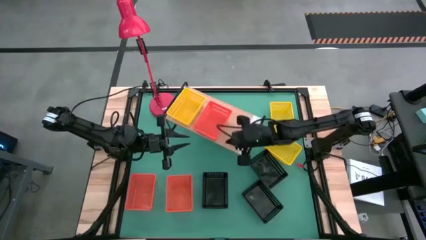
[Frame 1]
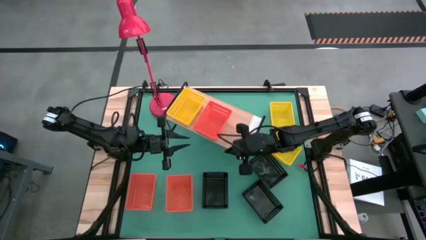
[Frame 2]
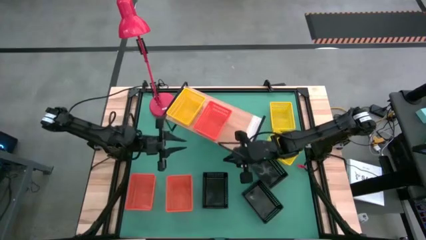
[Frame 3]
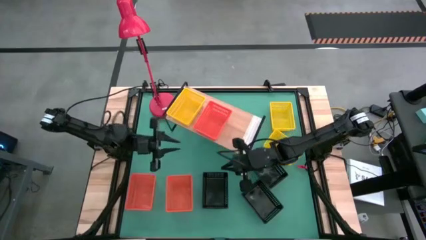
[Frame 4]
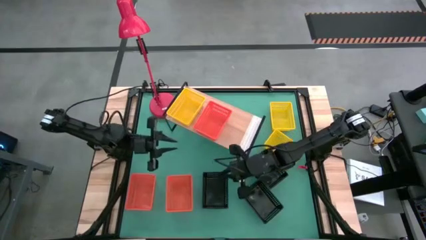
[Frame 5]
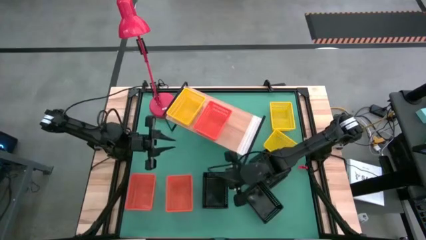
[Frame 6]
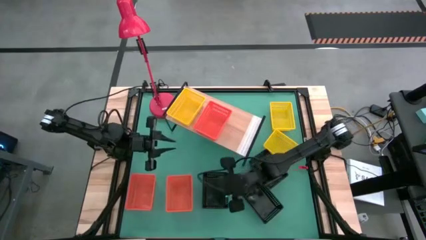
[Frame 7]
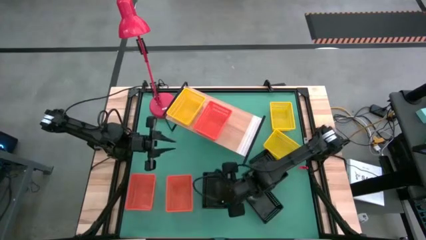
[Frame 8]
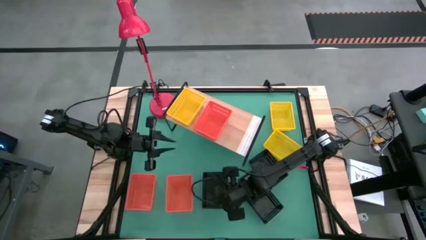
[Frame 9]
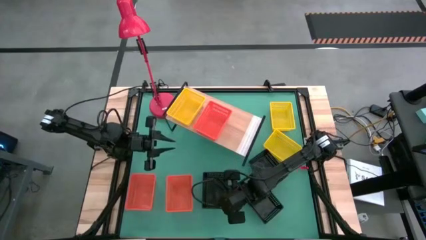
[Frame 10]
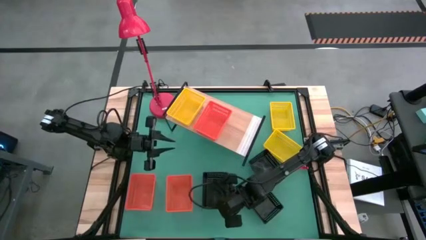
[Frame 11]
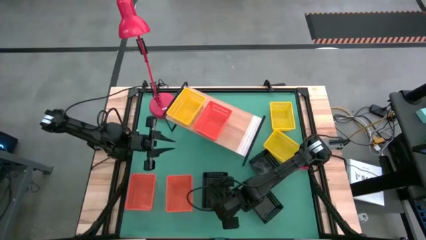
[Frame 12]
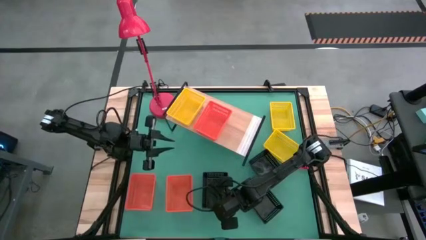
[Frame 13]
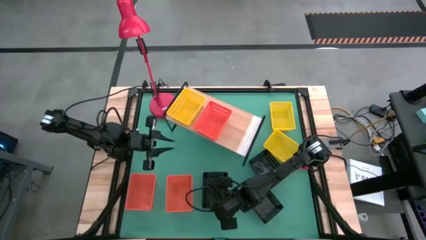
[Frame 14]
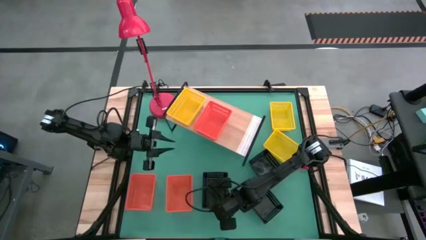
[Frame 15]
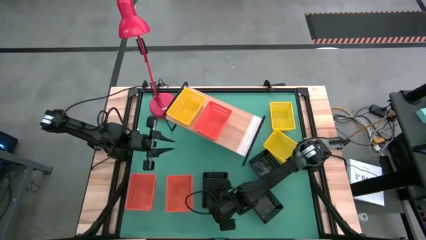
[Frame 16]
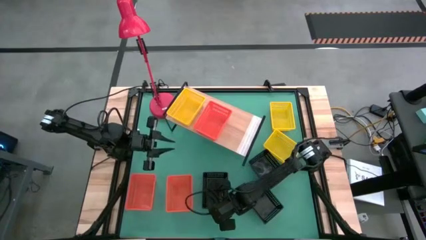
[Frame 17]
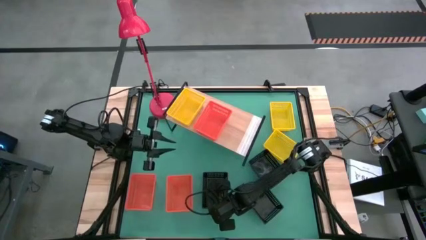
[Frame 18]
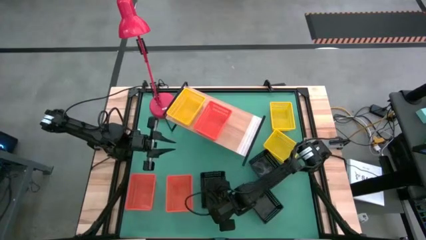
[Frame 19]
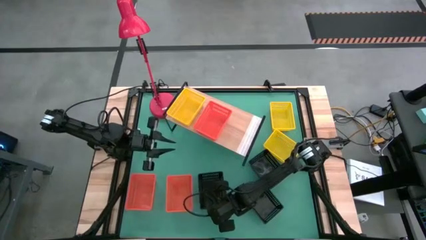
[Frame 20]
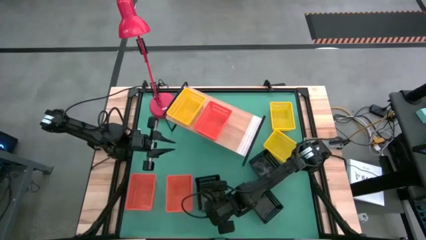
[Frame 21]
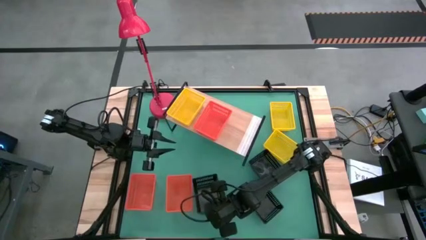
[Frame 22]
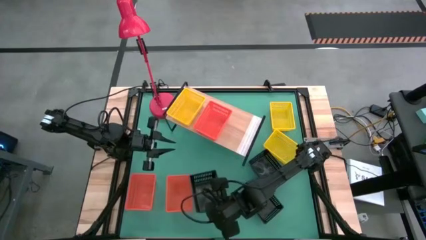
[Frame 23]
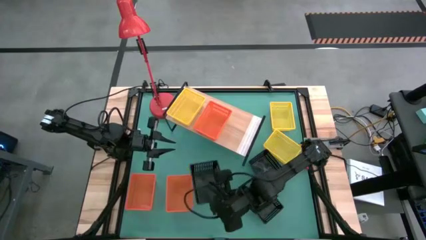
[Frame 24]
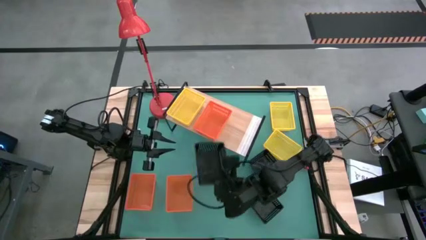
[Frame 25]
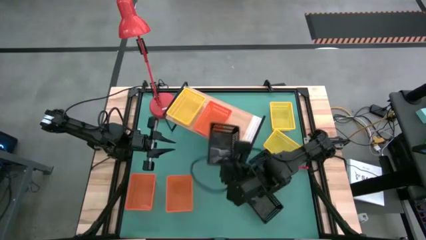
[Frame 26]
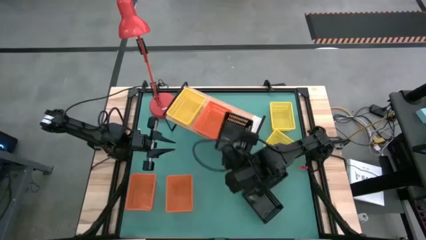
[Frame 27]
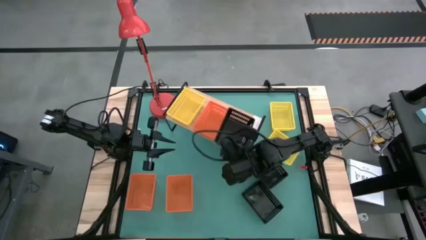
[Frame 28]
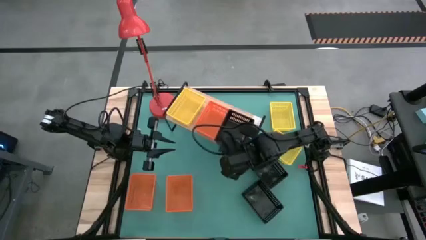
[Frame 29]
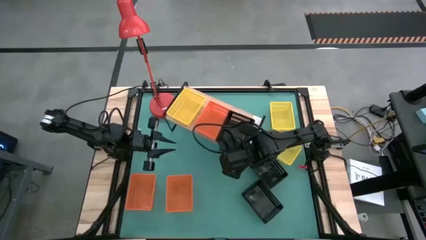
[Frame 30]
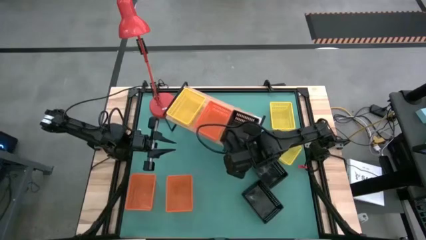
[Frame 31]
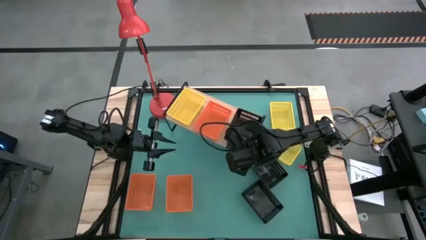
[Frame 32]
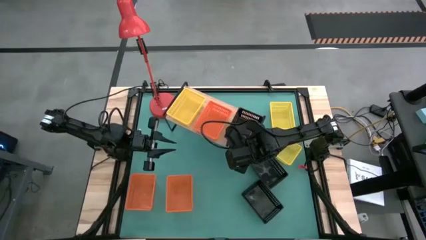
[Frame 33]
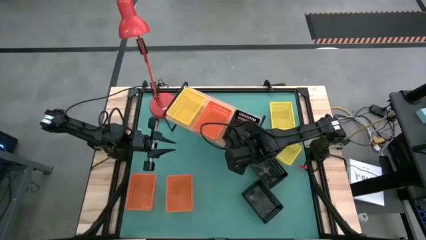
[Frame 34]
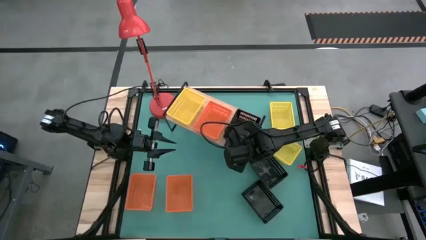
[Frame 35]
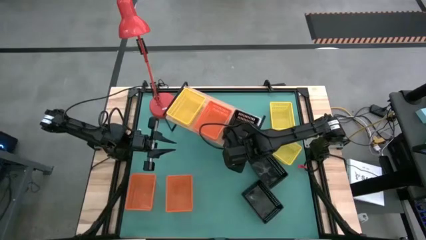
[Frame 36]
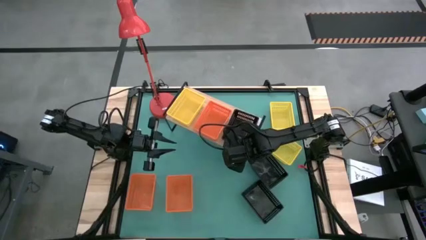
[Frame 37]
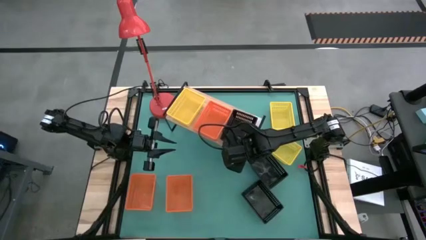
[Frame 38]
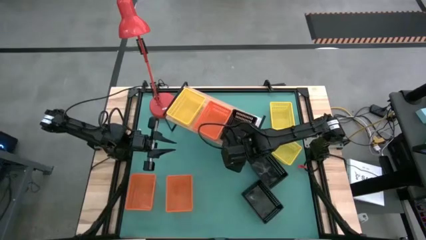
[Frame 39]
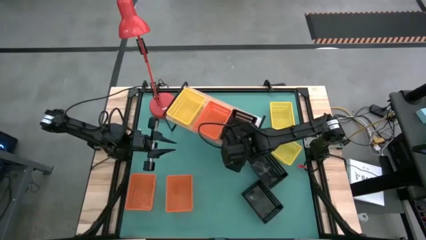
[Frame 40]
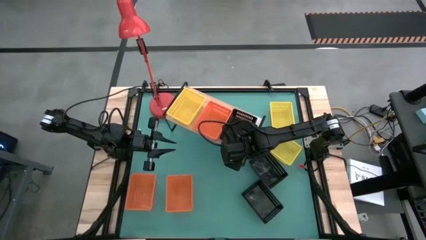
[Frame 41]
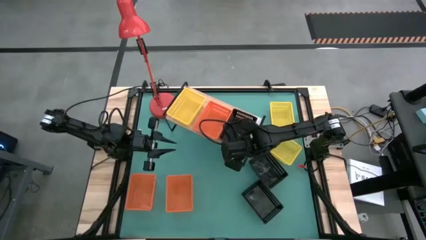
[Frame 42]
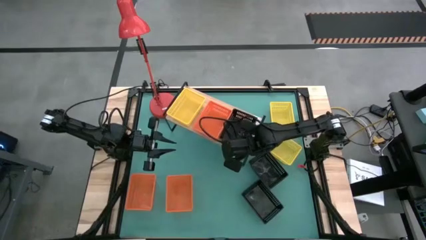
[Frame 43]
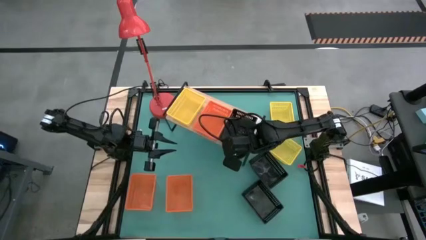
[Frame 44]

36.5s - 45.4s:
Task: Stack baskets on shelf by color
Put the bottom left black bin on the shelf

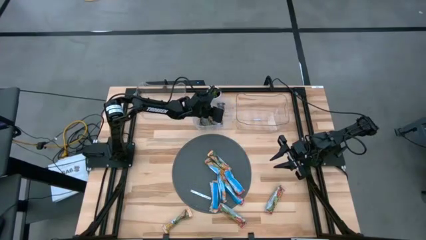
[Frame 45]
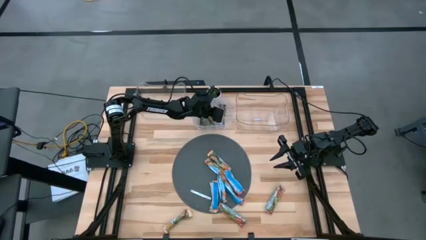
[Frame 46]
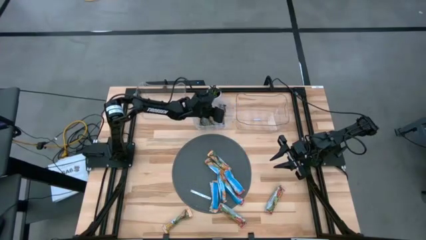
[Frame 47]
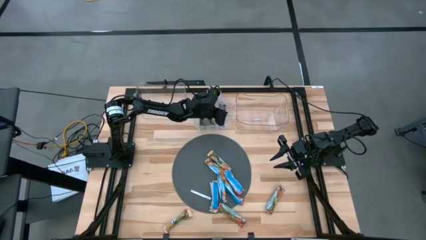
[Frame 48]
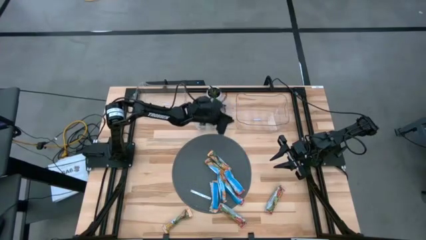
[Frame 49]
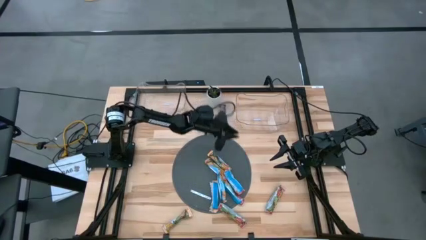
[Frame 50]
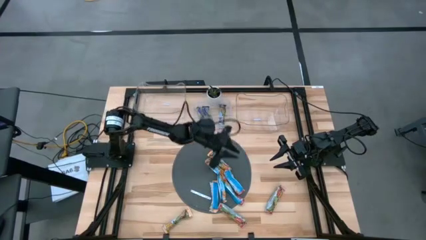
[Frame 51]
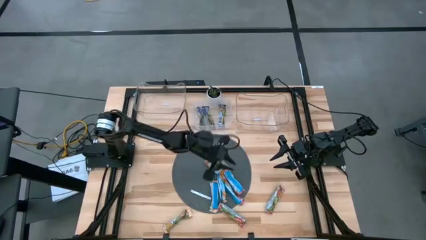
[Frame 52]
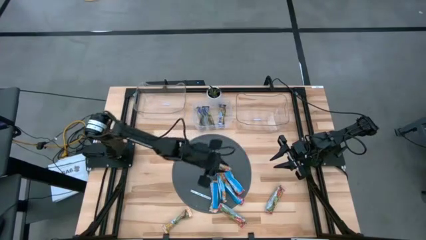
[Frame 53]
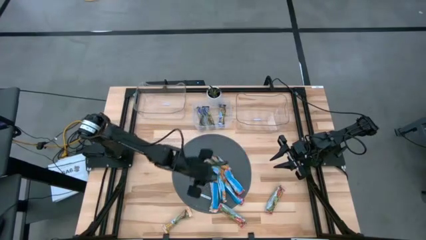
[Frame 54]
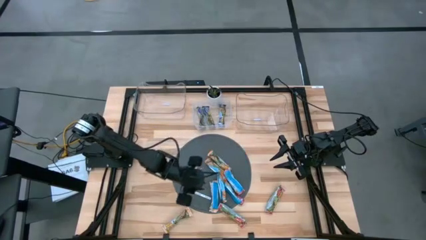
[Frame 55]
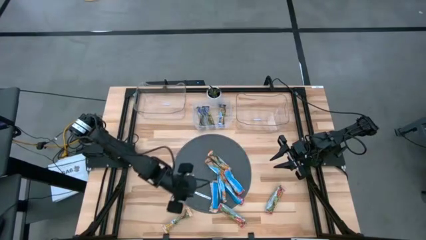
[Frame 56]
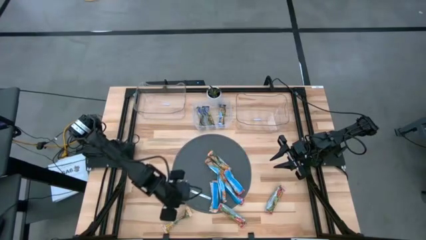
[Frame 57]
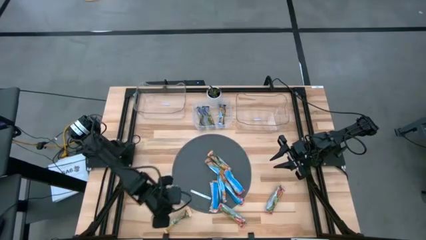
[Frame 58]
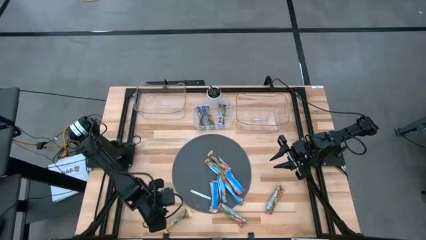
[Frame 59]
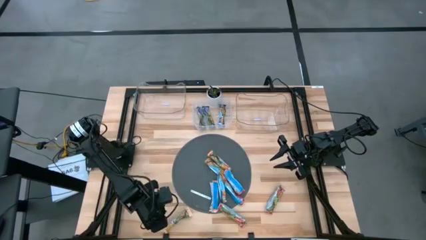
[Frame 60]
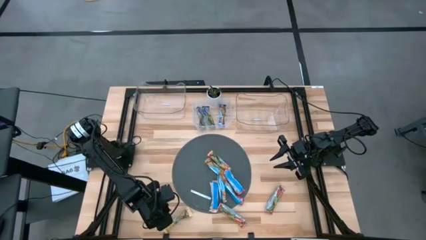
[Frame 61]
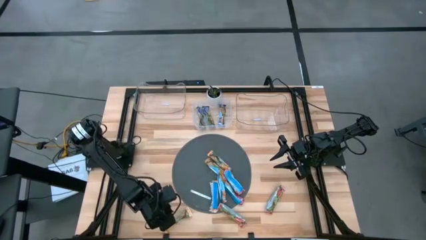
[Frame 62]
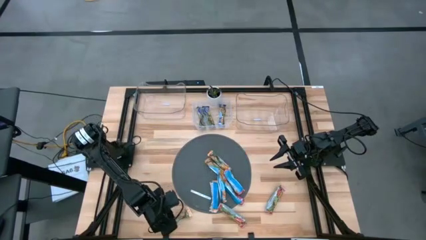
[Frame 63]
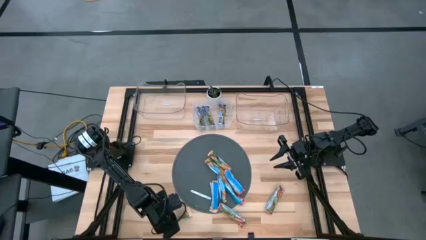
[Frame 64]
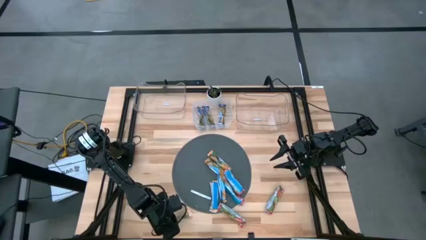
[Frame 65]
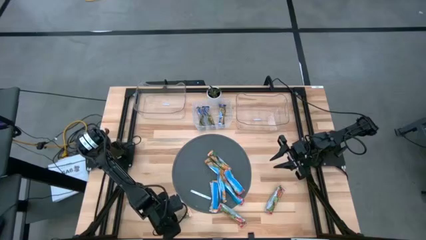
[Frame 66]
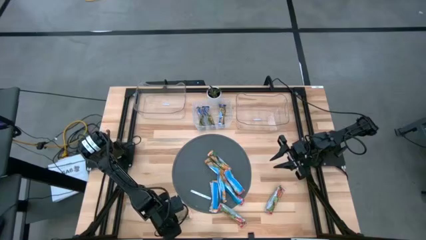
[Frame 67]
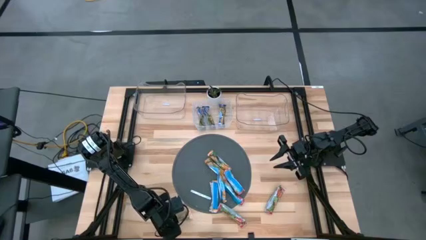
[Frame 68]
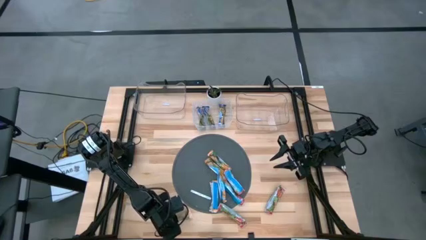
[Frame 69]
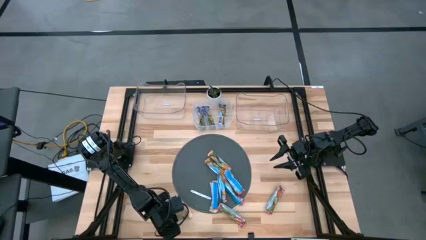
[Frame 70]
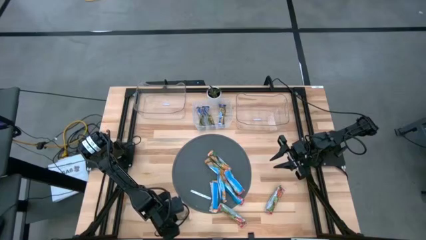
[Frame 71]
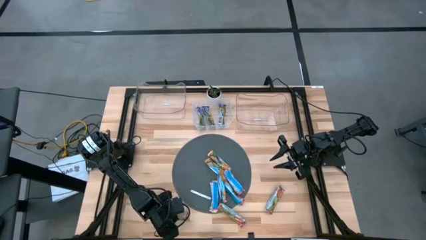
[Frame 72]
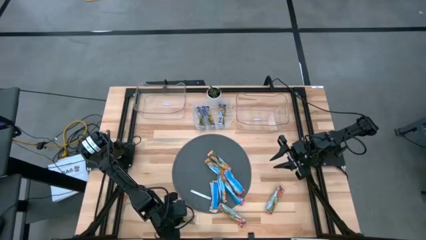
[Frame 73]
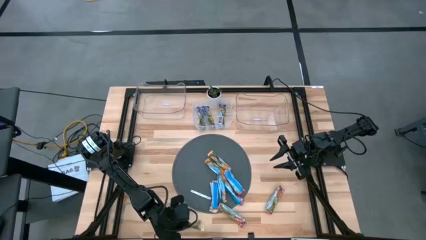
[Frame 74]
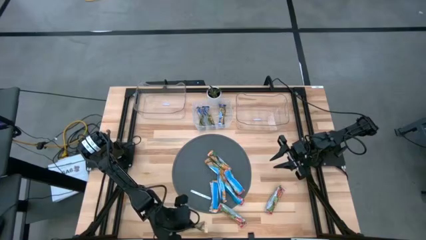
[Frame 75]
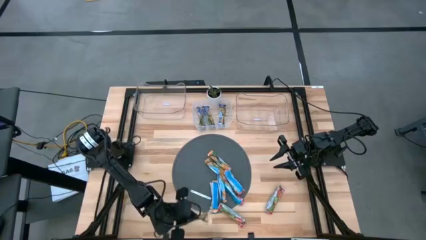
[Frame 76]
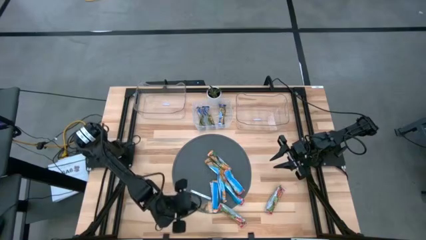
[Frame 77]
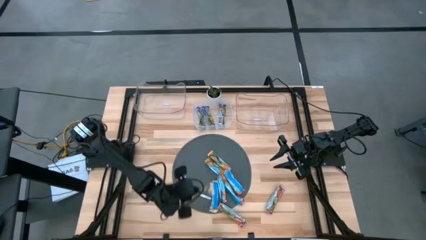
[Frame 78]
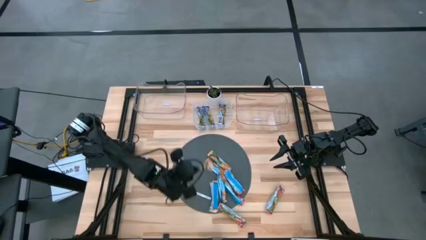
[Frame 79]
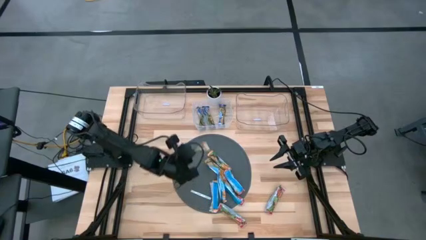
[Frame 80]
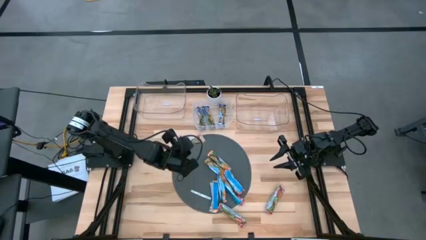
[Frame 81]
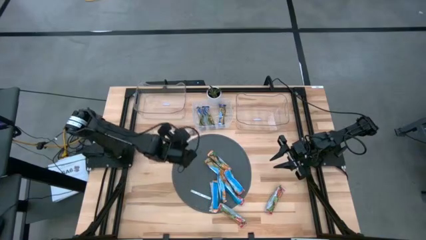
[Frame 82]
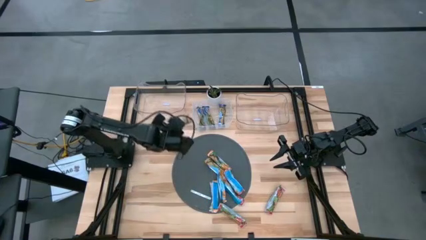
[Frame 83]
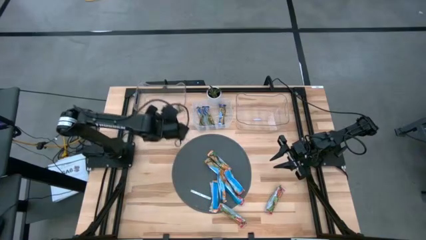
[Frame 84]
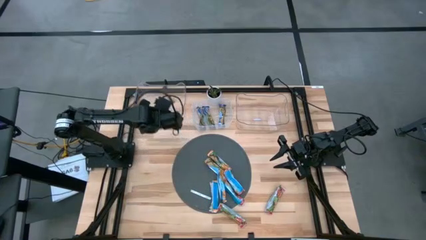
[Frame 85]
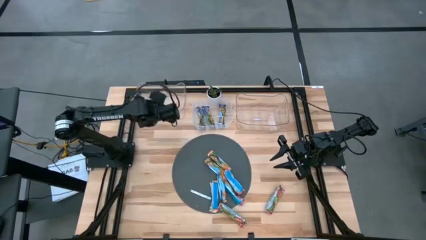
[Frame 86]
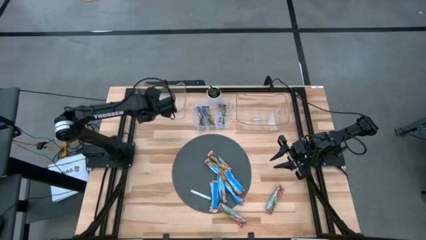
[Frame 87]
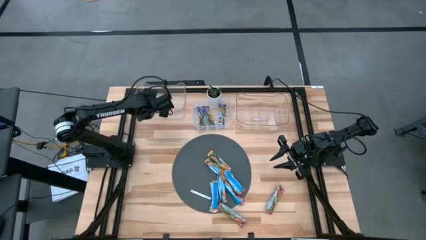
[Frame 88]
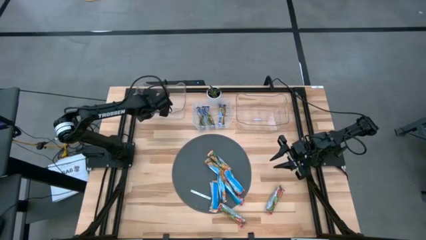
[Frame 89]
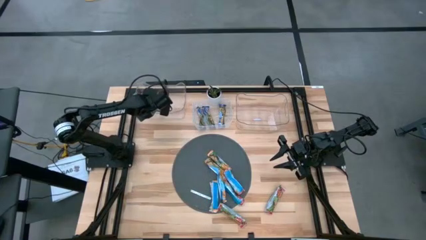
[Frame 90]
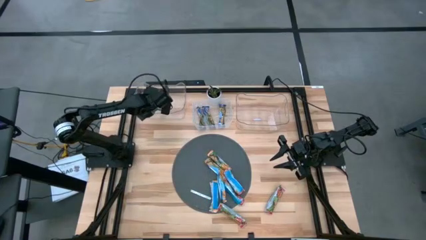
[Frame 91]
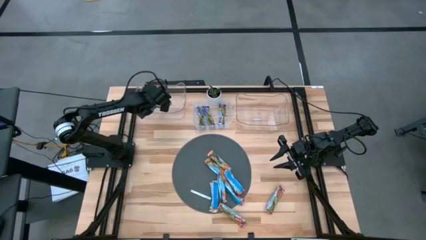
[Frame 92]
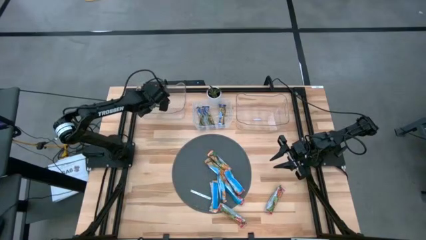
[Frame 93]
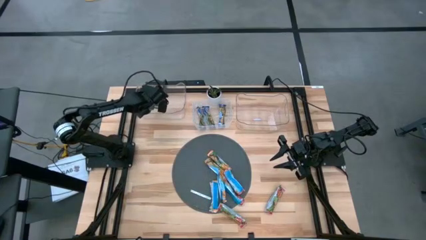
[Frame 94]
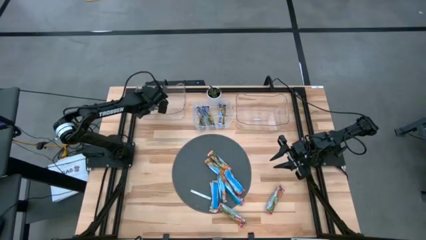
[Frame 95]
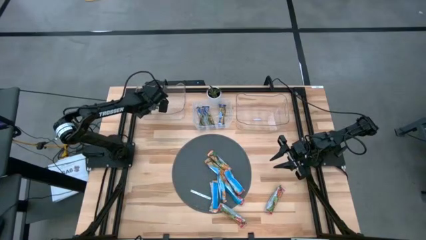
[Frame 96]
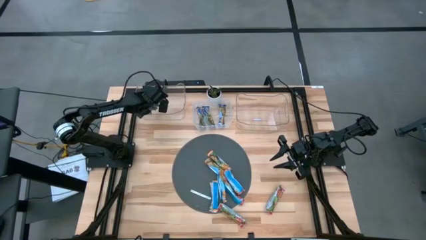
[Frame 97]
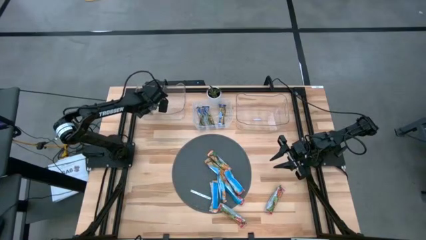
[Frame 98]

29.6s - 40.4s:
Task: Pick and place Granola Bars by type
Put the yellow granola bar into the left transparent bin
